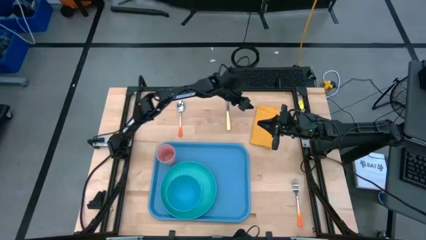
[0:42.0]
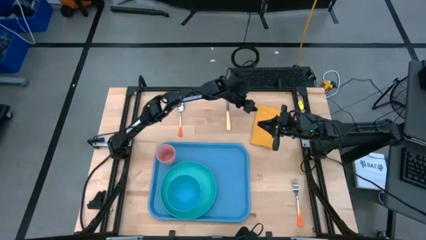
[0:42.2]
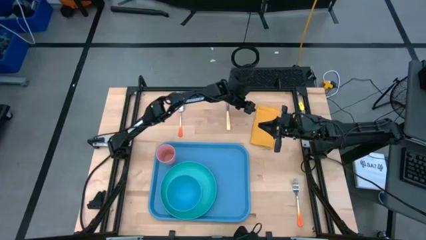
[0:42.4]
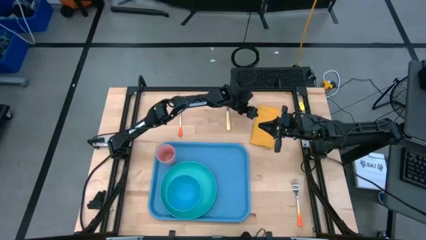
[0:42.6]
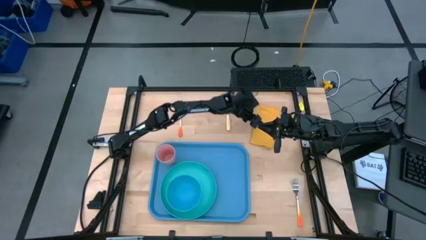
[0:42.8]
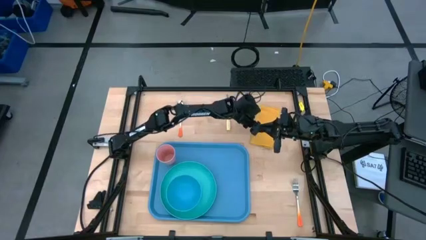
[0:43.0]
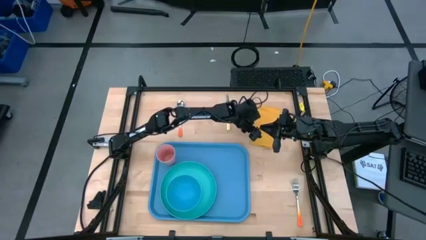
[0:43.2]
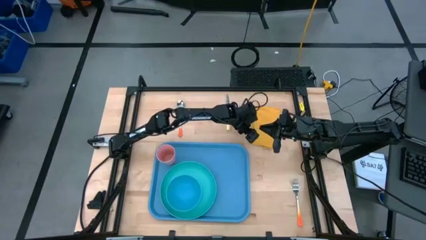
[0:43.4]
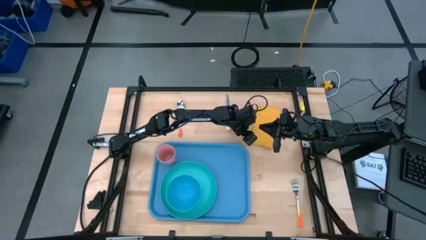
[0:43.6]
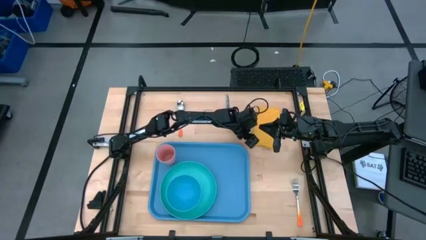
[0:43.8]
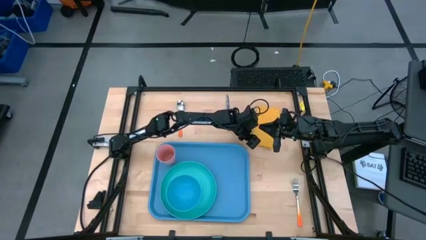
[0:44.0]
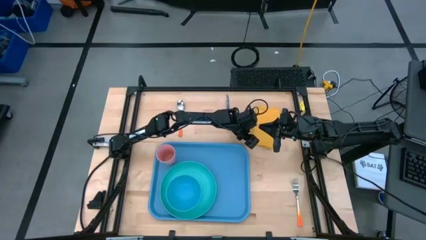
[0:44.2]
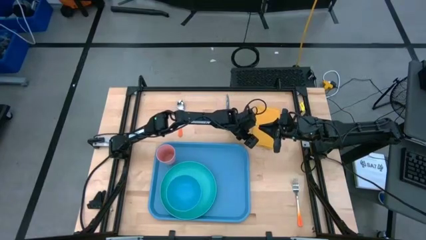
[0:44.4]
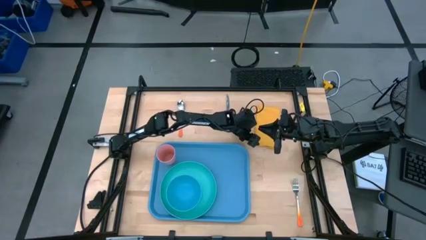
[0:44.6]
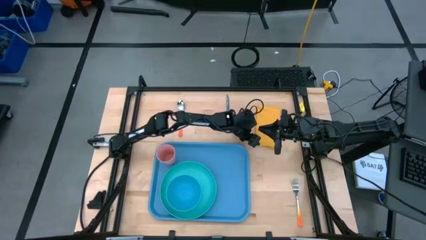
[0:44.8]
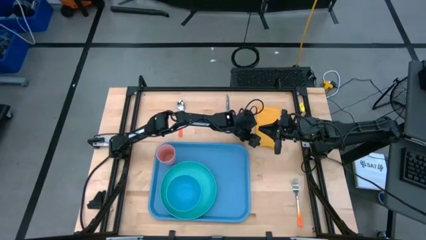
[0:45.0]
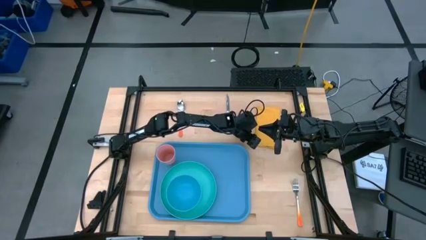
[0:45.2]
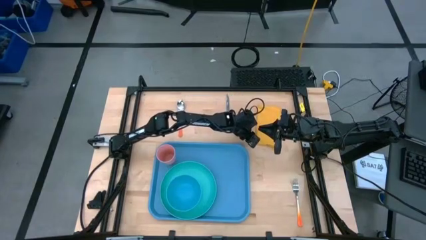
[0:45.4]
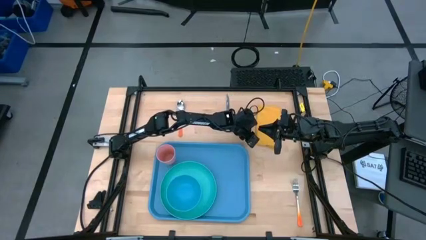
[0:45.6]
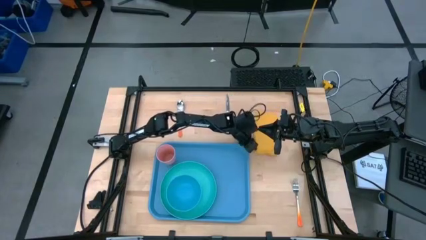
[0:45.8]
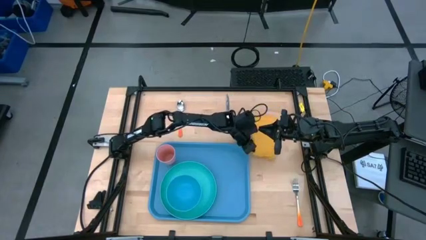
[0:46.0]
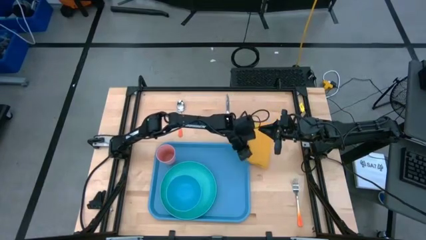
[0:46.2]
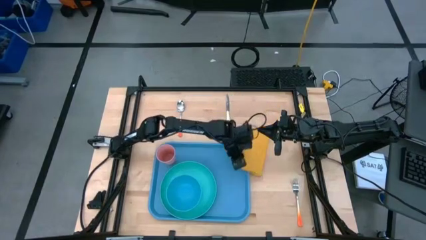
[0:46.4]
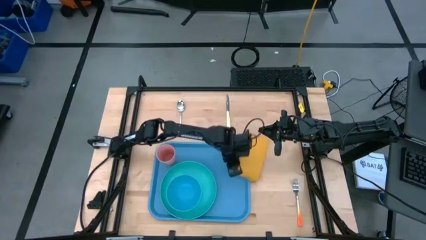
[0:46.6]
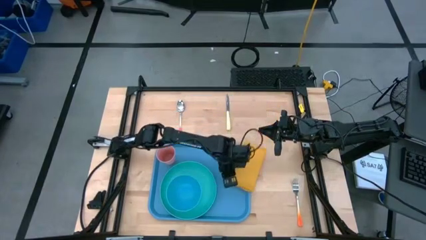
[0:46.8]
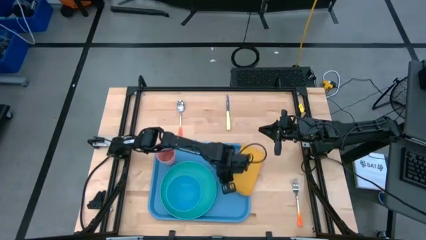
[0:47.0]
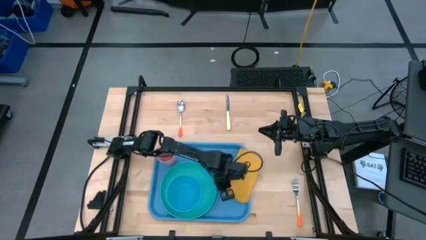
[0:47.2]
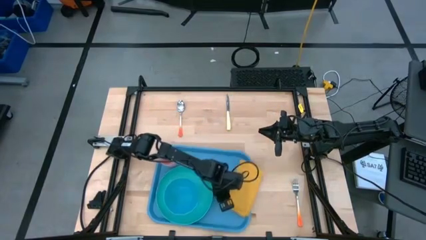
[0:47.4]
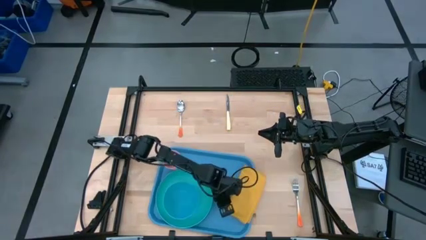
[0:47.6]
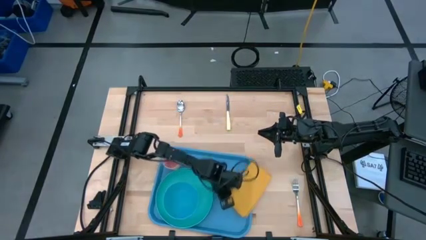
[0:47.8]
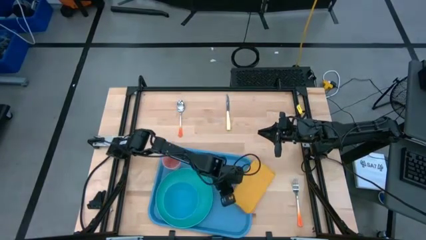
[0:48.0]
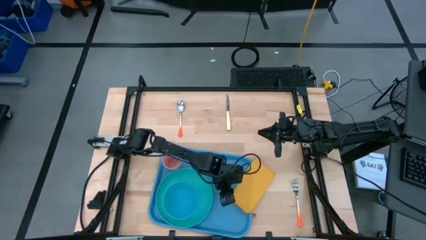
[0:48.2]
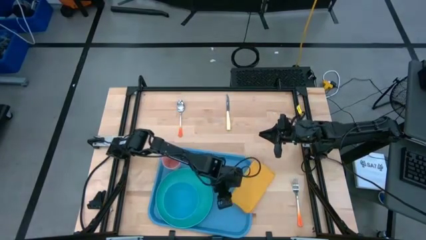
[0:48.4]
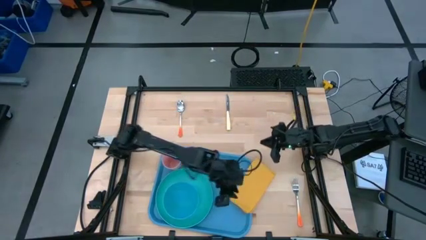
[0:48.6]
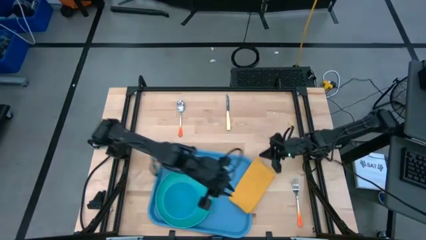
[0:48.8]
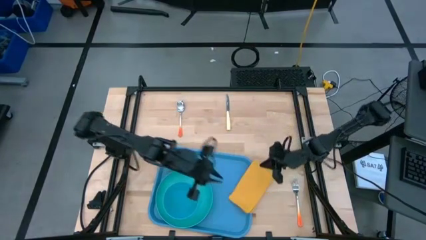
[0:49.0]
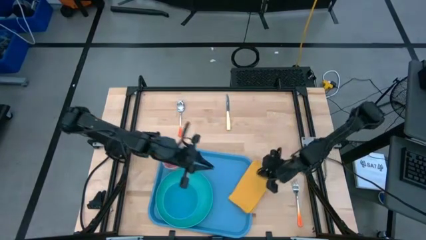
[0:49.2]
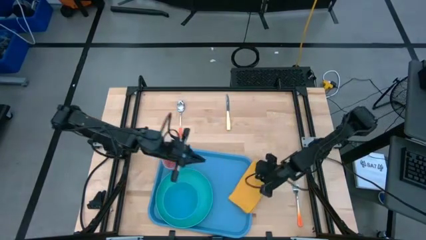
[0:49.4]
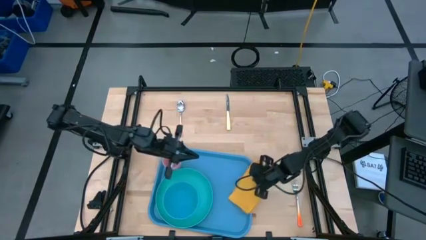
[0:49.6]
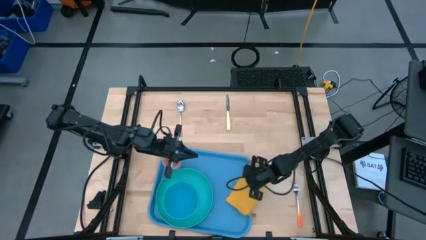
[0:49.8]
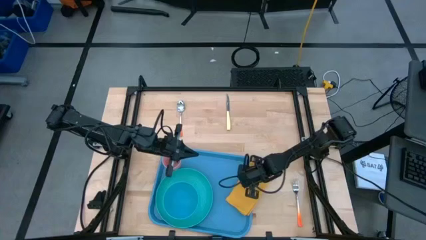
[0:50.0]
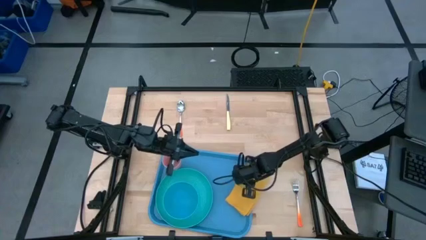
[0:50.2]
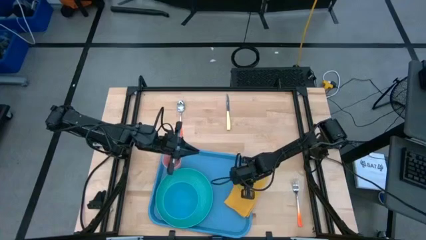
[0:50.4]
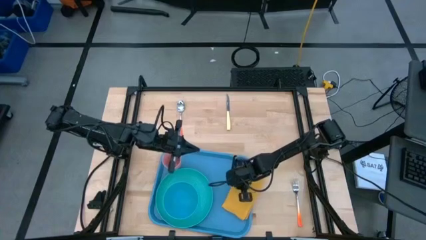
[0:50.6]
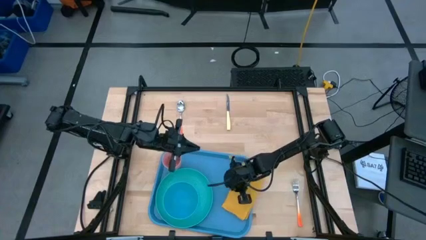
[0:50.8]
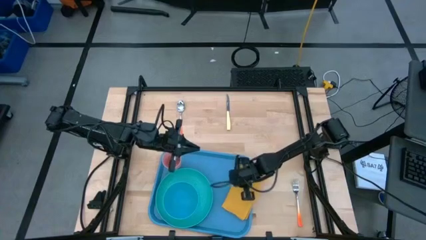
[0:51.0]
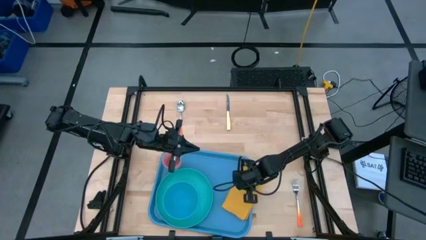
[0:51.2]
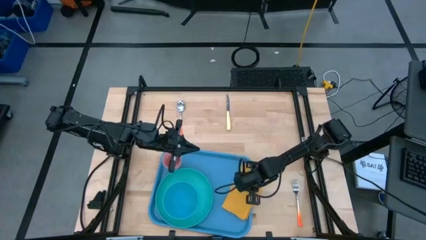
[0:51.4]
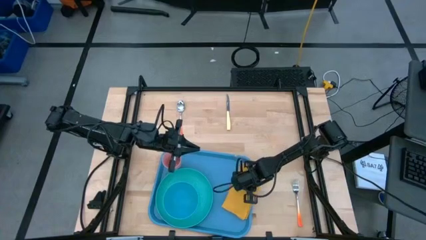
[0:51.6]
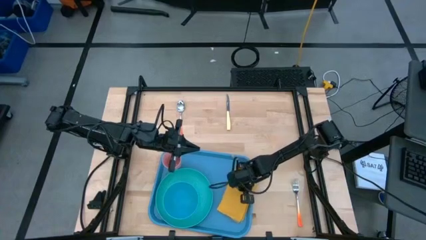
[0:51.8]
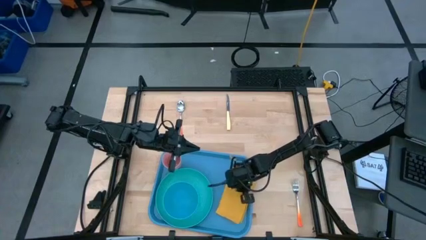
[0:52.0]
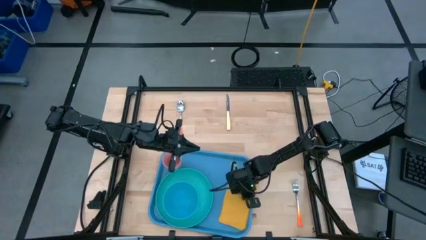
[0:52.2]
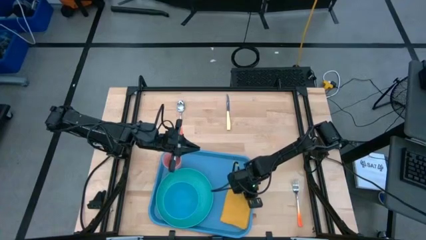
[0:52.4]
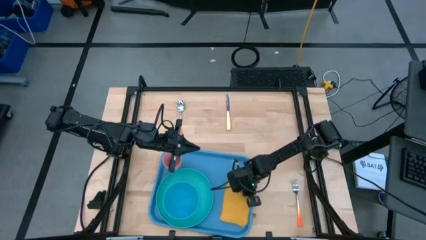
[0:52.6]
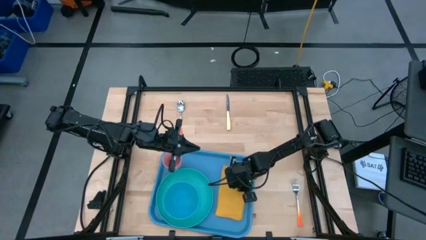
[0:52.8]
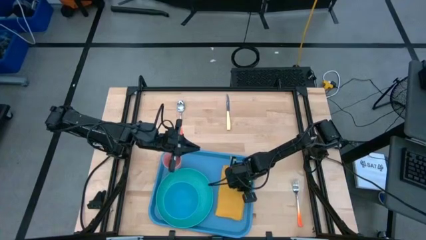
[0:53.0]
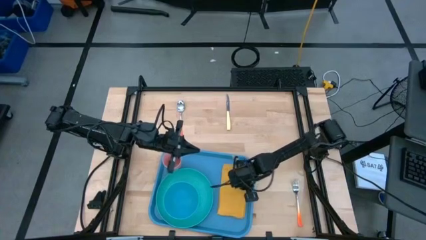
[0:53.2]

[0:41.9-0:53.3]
Task: Set up tray
Put the yellow napkin to the right of the light blue plate on the blue serving tray

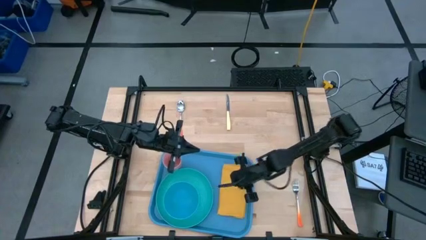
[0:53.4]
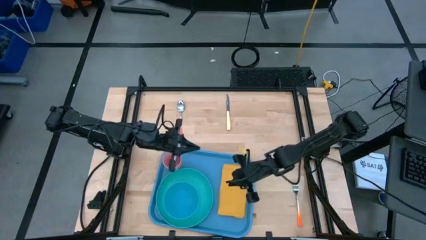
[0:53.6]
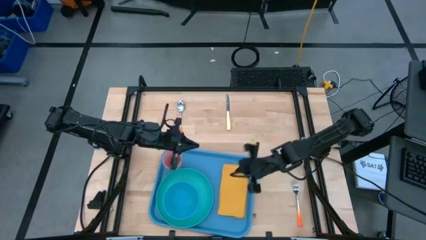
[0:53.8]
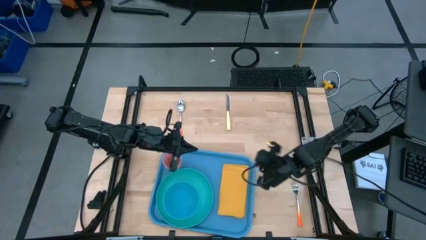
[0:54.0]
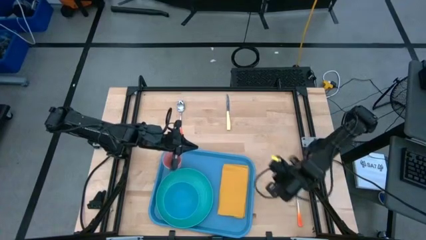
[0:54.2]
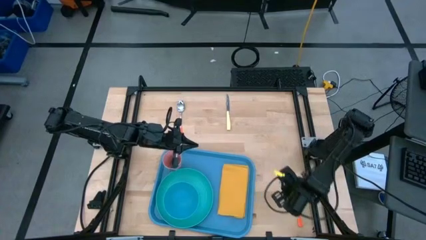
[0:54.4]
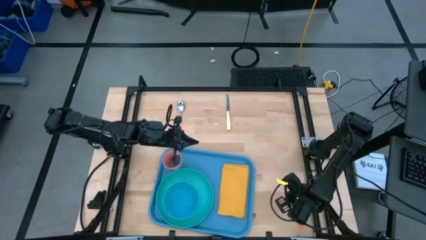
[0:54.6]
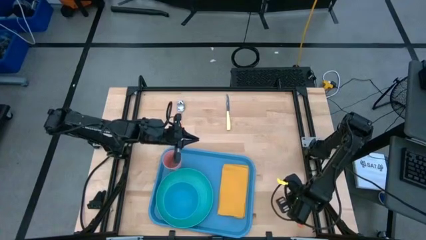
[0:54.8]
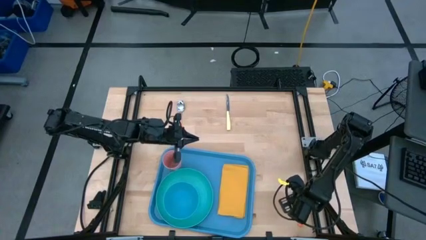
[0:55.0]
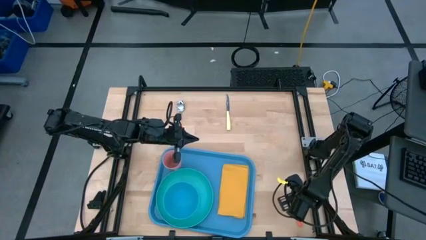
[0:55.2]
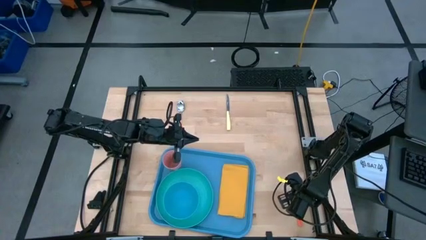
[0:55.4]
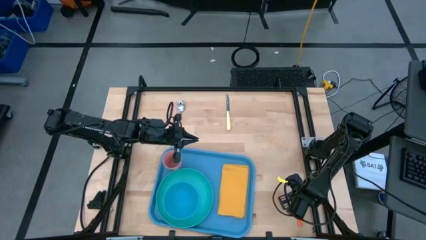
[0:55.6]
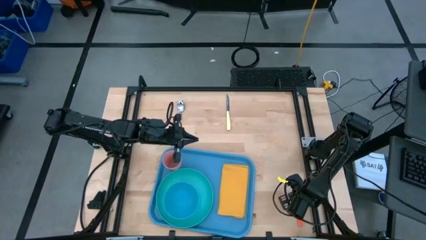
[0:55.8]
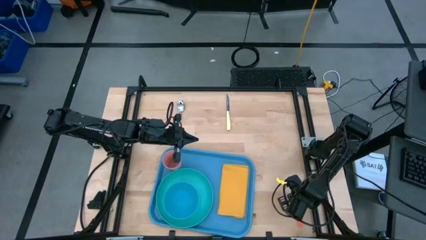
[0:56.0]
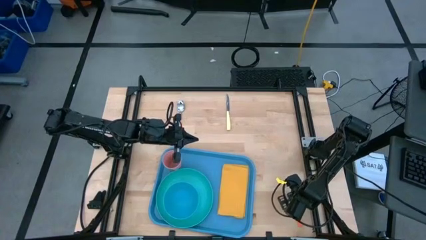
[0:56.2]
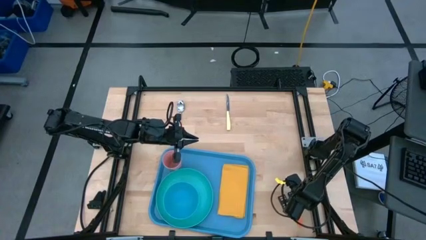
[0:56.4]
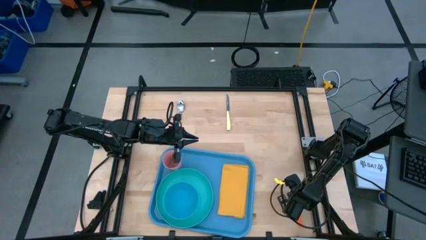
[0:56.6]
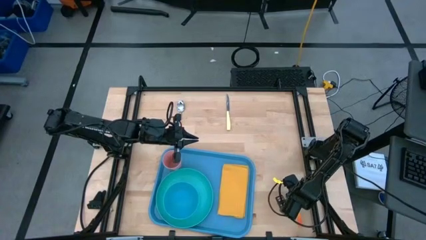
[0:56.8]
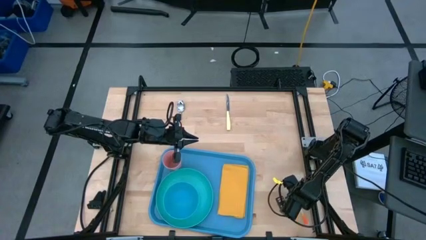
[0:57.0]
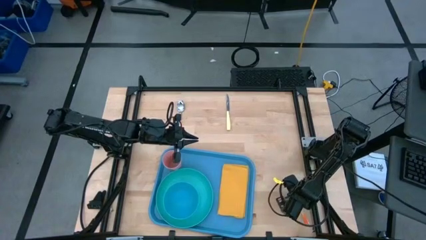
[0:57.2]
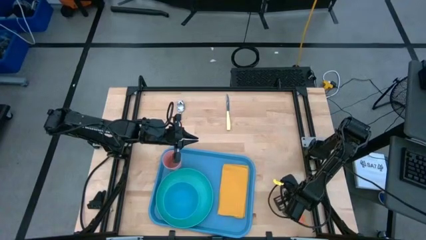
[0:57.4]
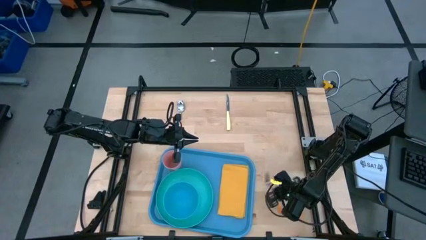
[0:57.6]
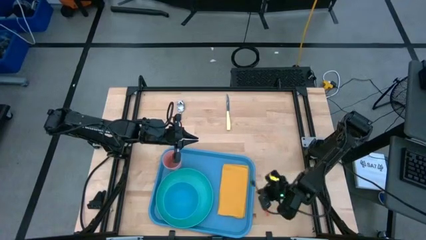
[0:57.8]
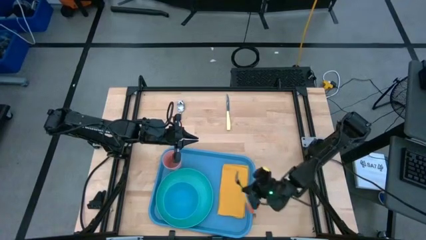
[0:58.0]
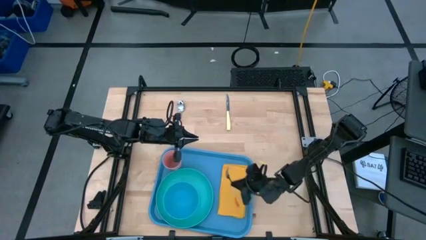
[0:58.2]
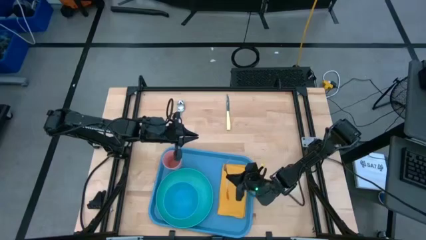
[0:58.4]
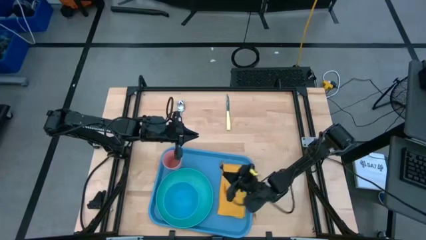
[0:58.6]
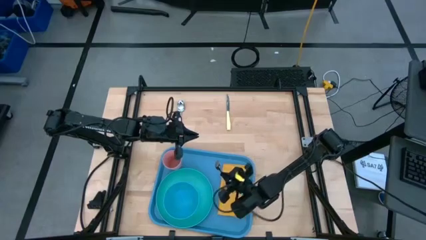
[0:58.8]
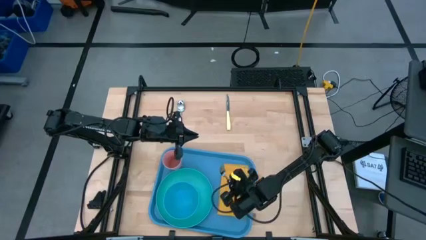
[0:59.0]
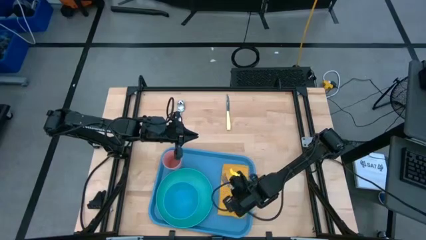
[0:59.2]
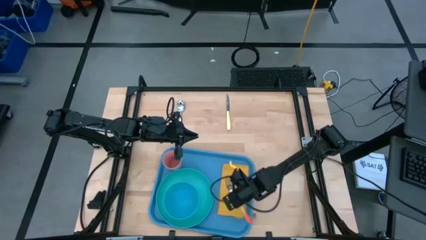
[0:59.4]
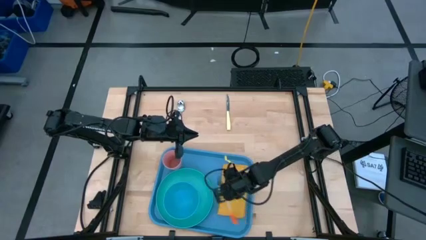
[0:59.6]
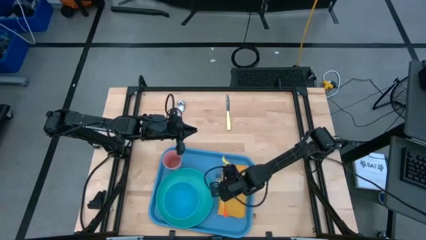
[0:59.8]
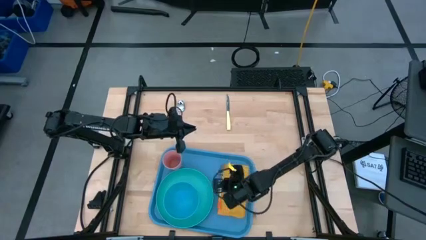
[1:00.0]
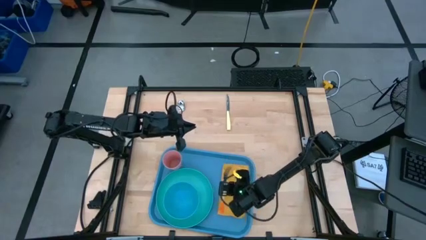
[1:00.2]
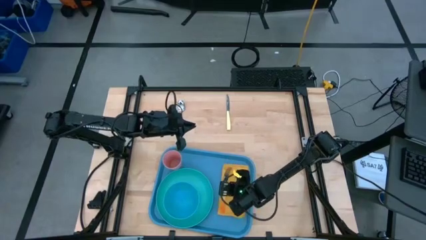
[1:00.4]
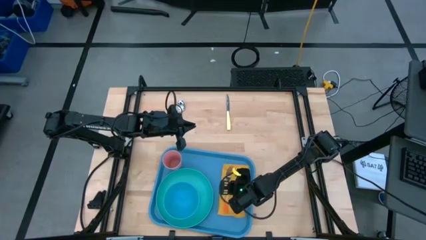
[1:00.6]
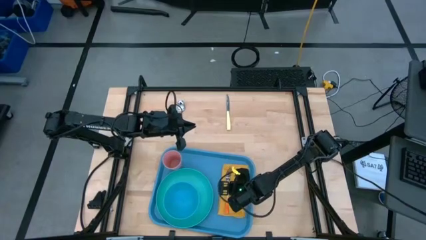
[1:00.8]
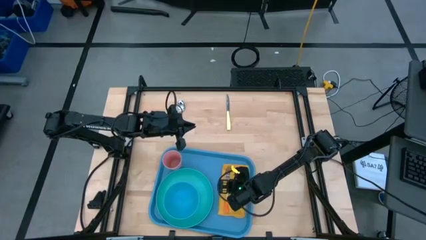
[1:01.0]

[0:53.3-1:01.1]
Put the orange fork on top of the yellow napkin
